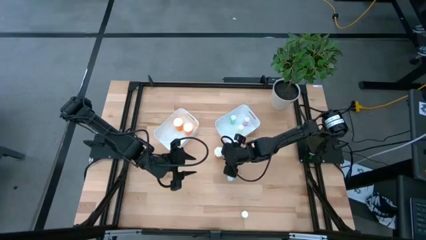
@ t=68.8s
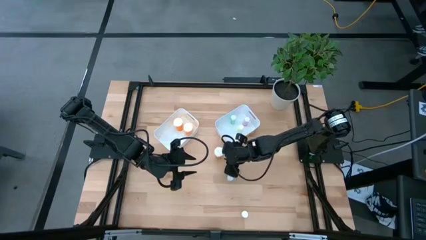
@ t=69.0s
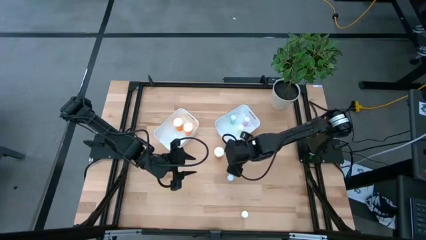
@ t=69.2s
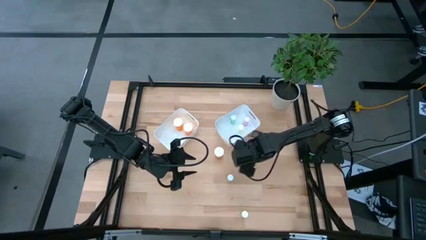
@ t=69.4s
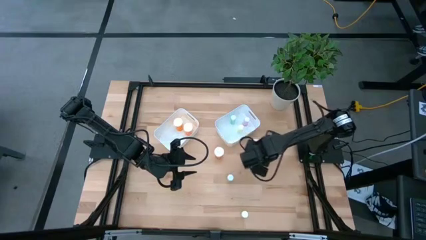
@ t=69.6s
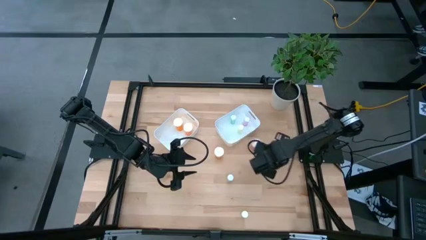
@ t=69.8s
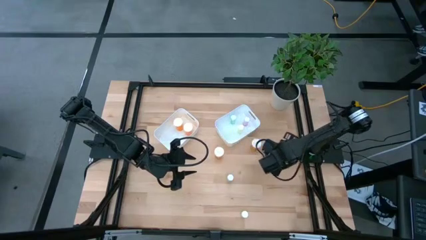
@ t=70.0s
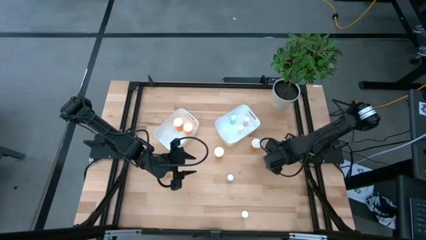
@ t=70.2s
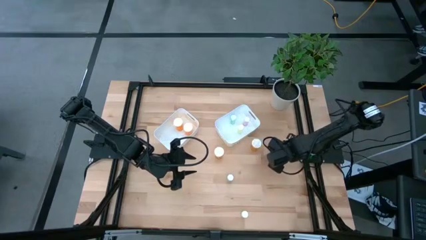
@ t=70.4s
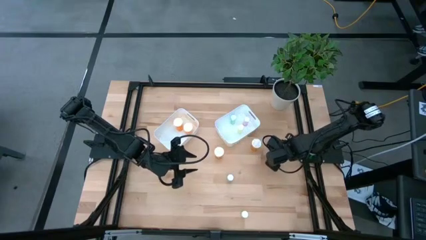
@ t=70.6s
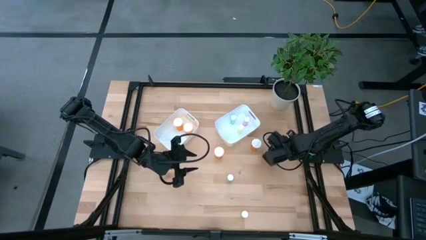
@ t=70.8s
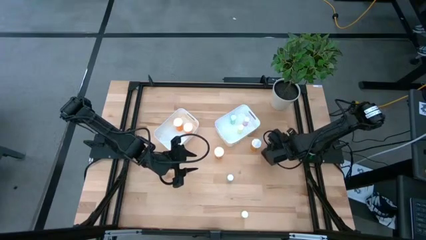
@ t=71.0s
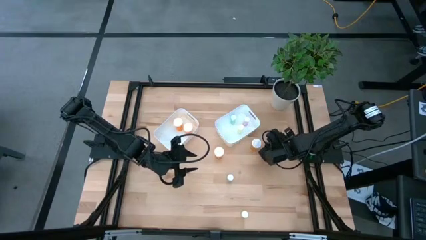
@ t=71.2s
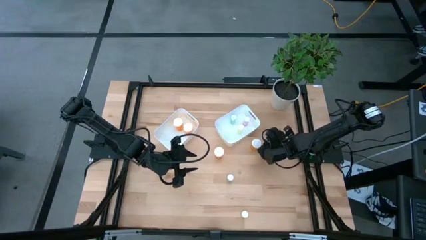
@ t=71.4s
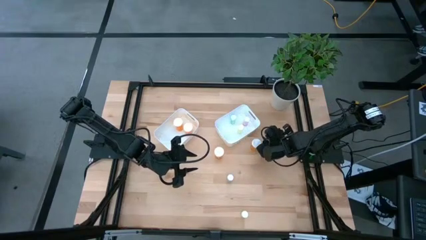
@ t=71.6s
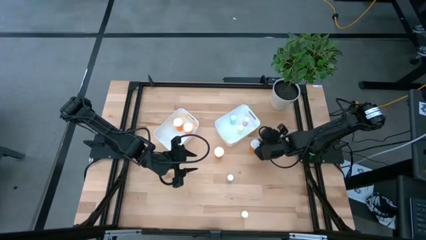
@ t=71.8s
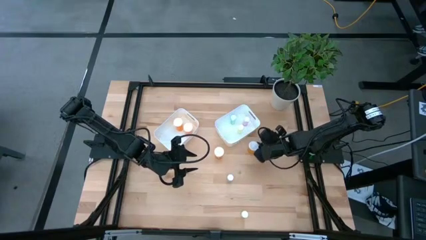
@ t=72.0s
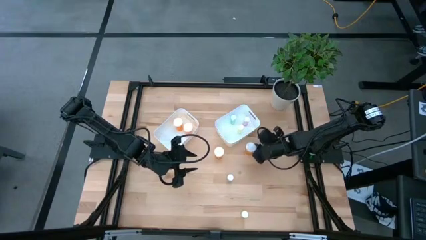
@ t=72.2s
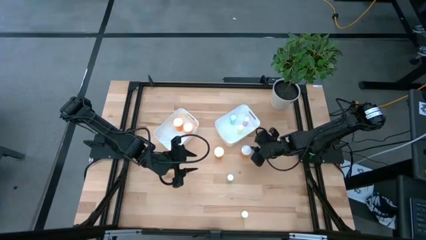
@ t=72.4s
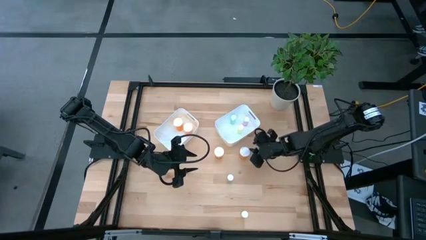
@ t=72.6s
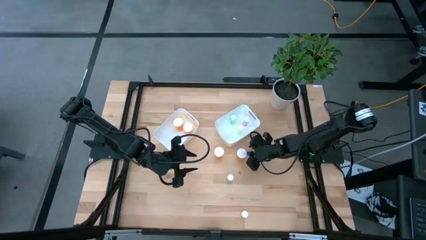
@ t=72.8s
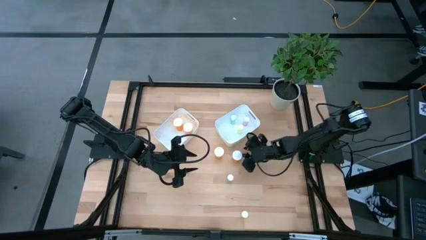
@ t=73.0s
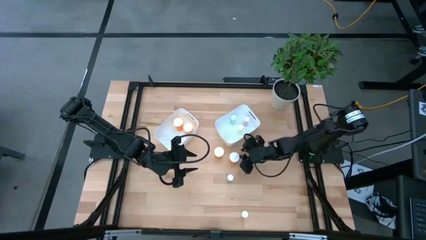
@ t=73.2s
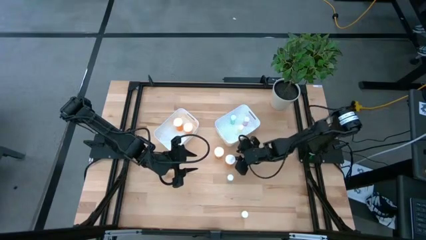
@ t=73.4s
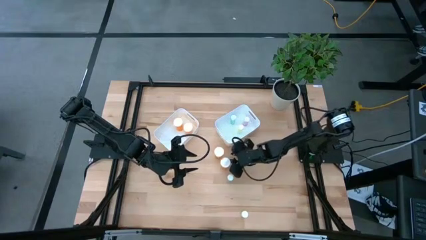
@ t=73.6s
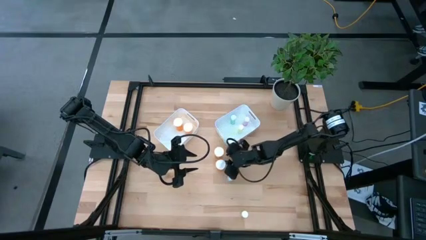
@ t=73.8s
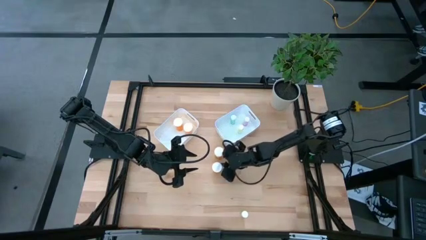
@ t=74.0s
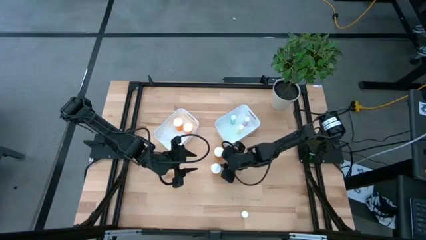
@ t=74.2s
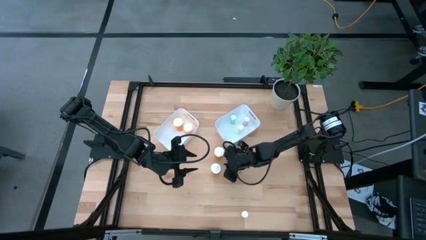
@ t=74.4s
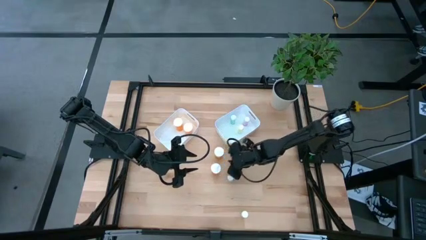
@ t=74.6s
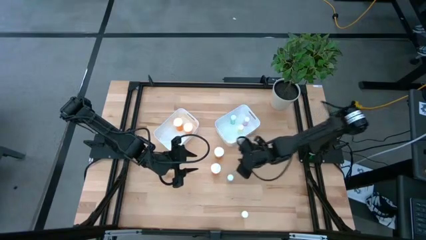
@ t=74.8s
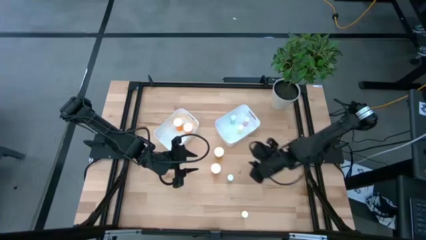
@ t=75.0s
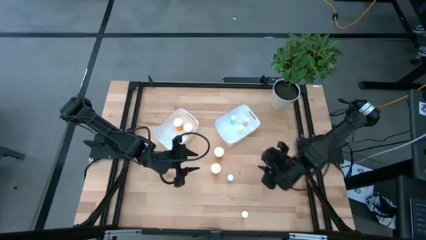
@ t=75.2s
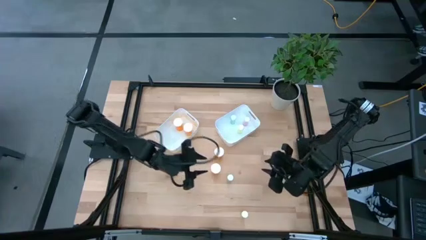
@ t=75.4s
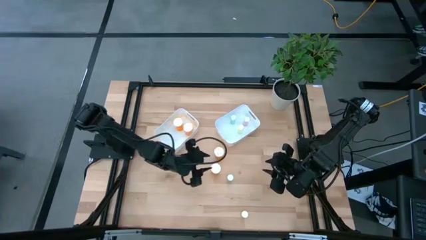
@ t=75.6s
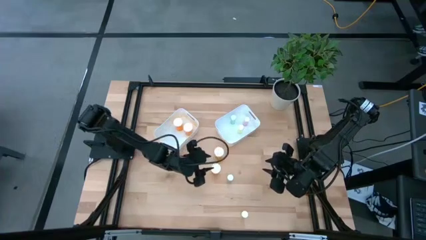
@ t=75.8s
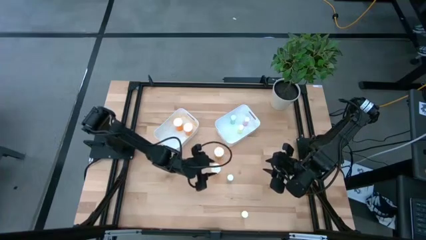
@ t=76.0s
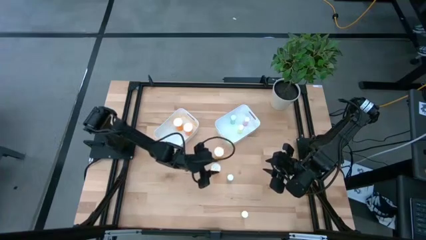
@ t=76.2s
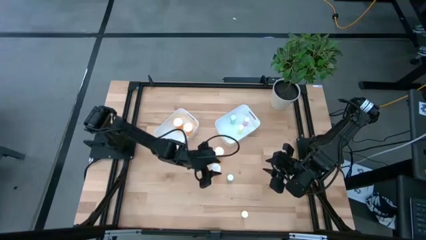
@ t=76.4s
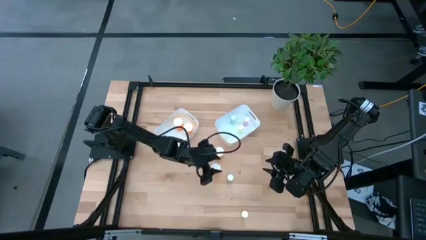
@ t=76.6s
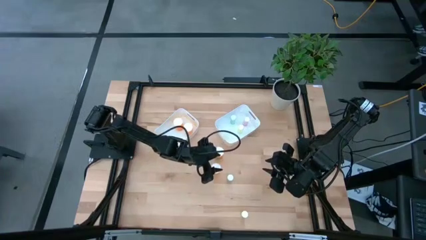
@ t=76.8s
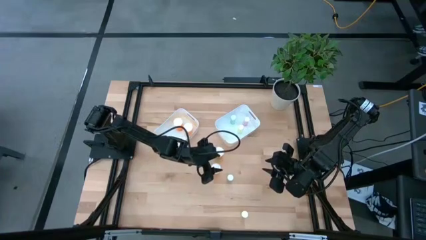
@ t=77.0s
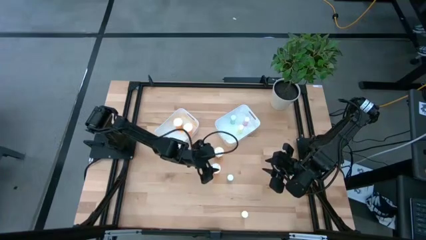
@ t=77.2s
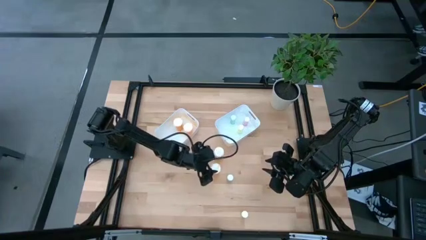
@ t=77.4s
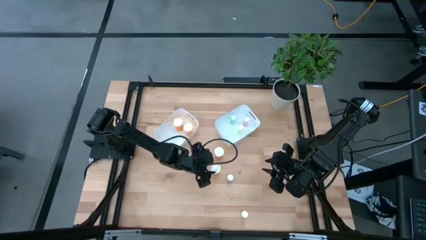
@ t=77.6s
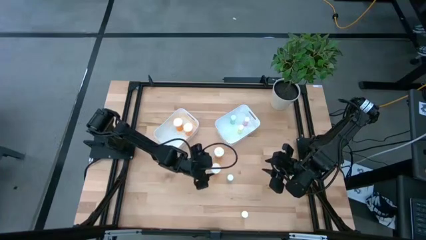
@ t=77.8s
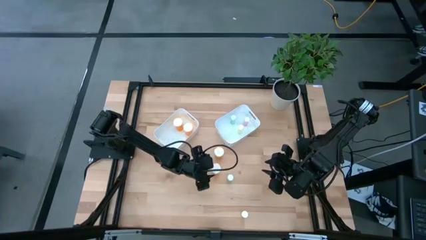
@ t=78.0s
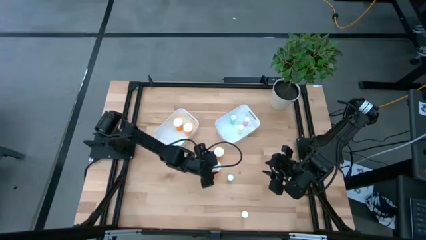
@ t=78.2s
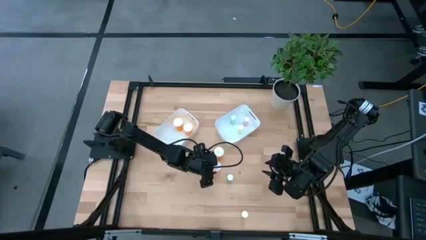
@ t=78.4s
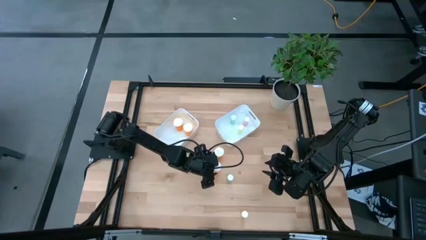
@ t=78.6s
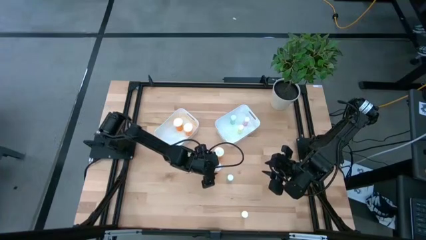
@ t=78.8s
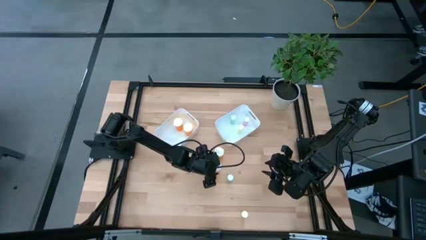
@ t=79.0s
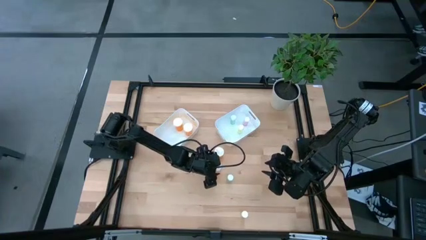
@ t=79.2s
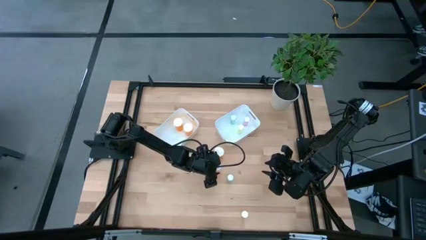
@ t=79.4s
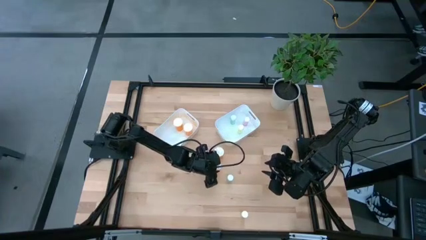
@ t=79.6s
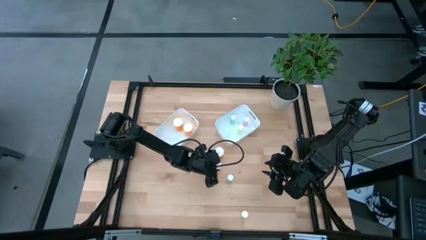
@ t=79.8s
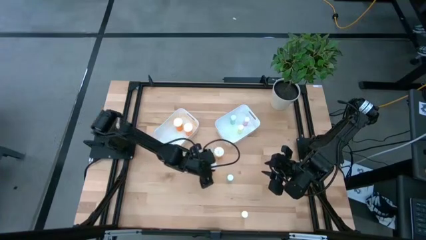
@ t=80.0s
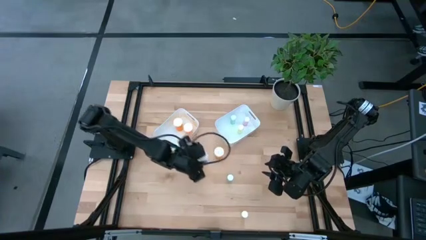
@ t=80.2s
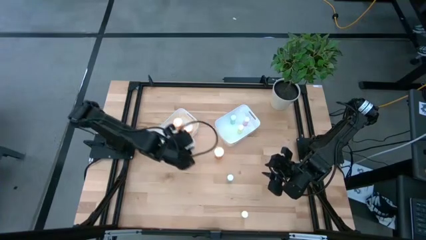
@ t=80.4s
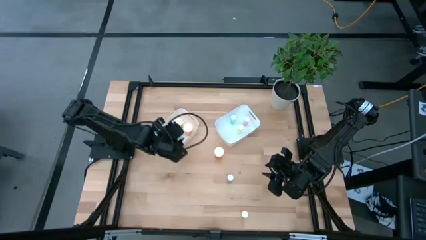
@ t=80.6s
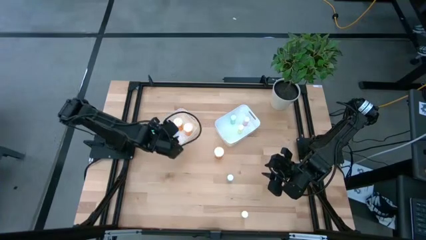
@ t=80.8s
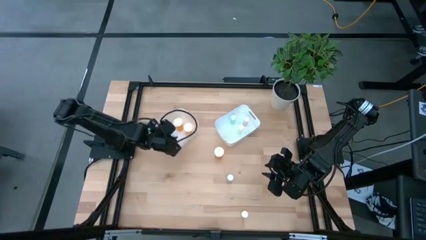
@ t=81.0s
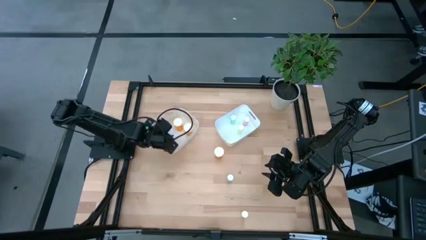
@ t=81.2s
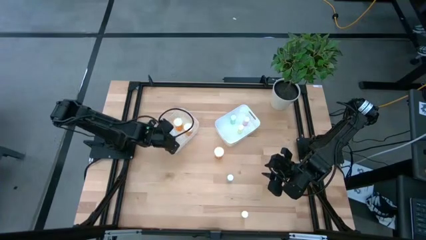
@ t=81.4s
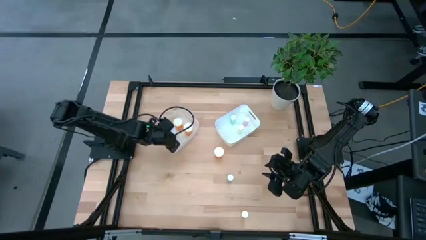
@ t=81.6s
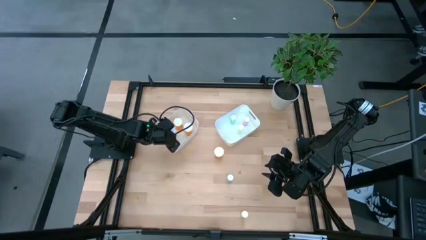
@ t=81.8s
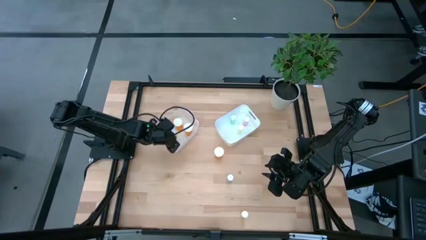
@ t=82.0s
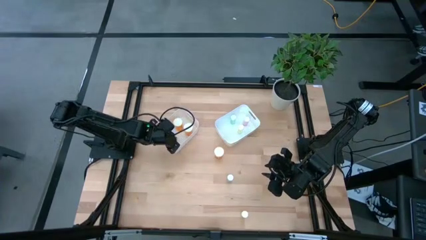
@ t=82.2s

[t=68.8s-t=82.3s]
Task: Pick and place medicine bottles into bin by pill shape (circle, oval)
Put the orange capsule bottle into the left white bin
